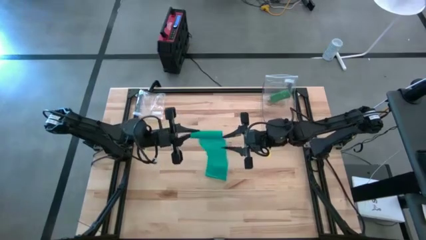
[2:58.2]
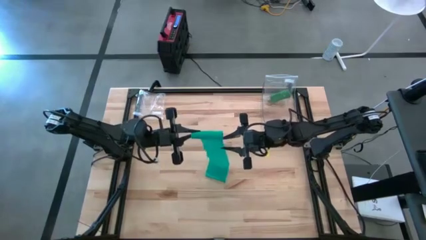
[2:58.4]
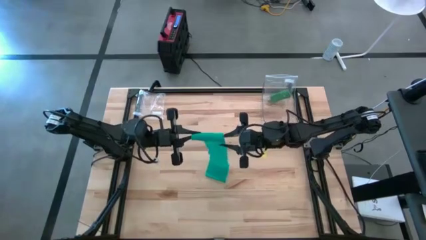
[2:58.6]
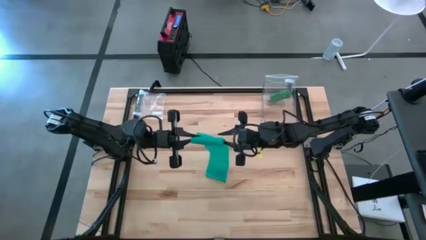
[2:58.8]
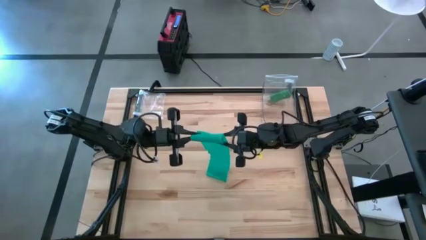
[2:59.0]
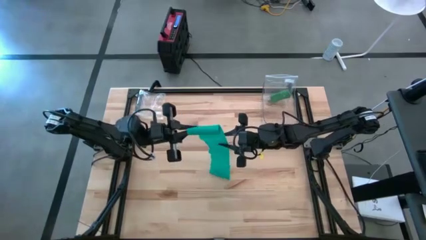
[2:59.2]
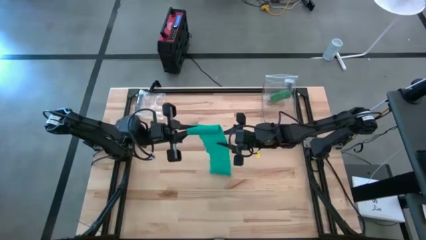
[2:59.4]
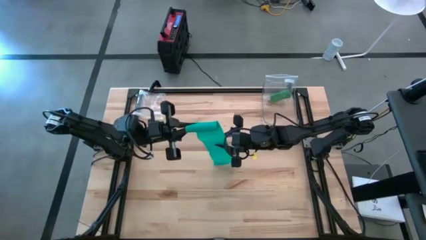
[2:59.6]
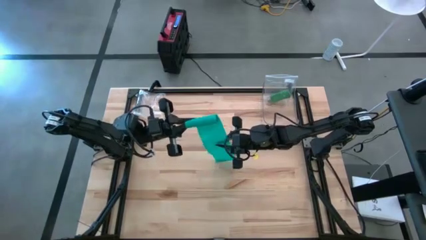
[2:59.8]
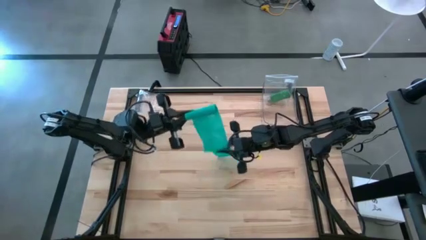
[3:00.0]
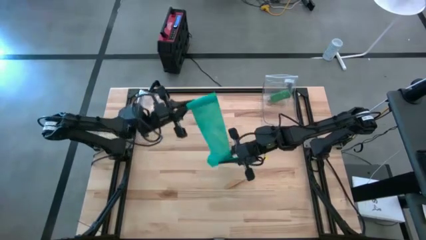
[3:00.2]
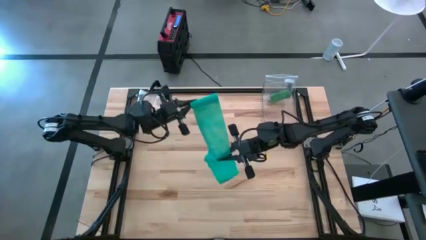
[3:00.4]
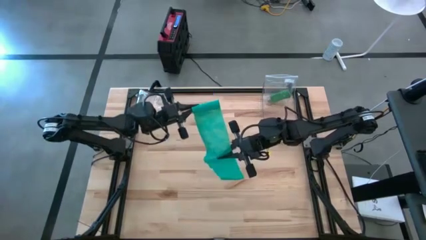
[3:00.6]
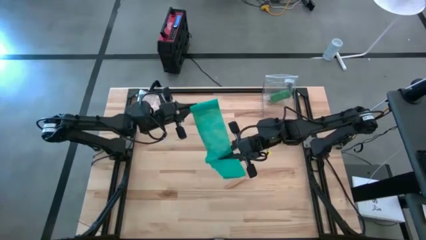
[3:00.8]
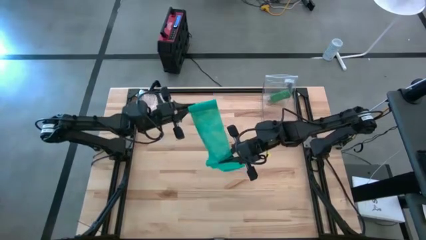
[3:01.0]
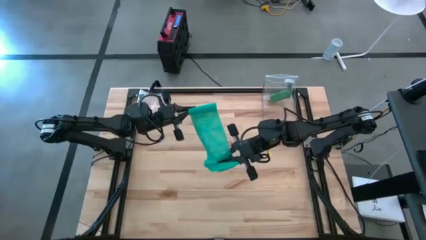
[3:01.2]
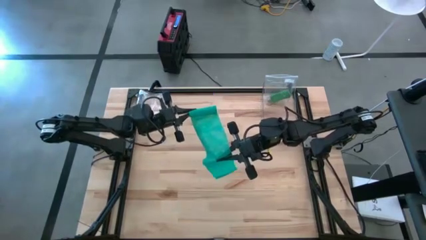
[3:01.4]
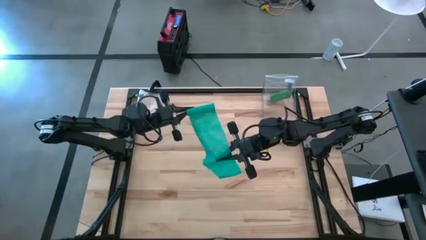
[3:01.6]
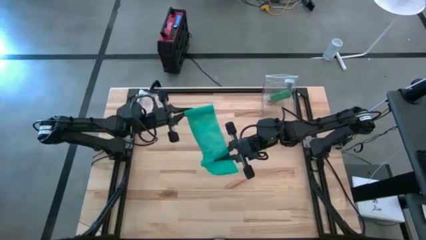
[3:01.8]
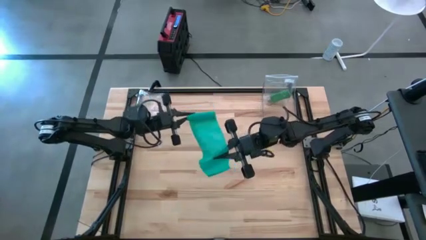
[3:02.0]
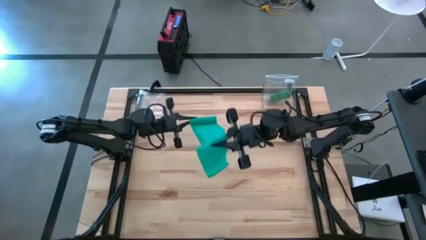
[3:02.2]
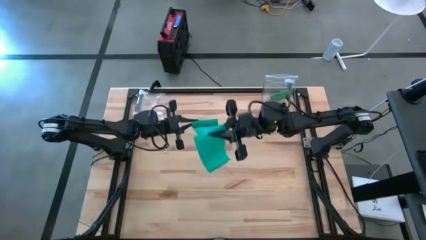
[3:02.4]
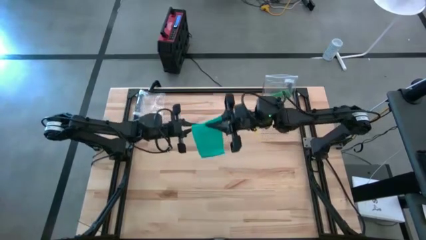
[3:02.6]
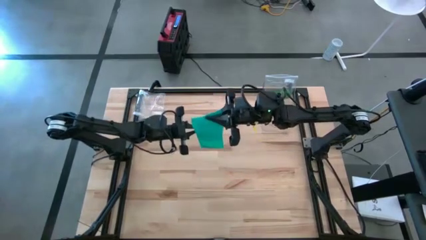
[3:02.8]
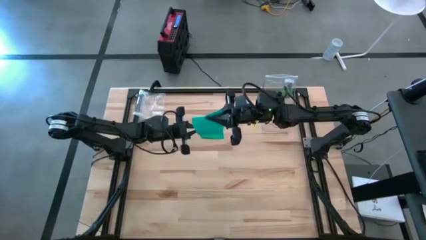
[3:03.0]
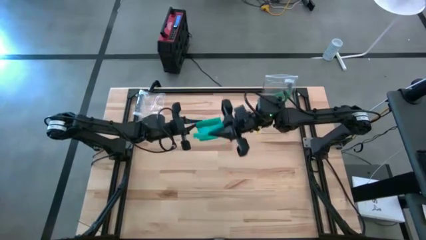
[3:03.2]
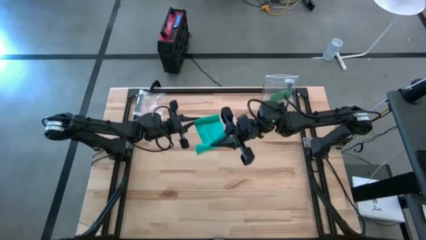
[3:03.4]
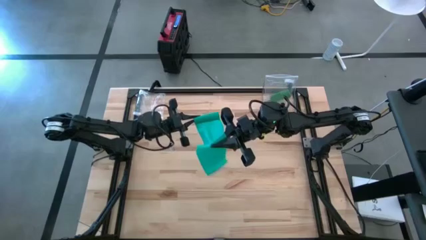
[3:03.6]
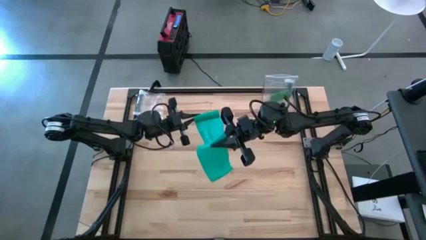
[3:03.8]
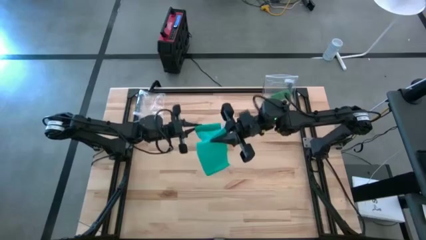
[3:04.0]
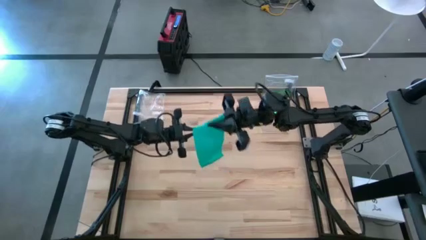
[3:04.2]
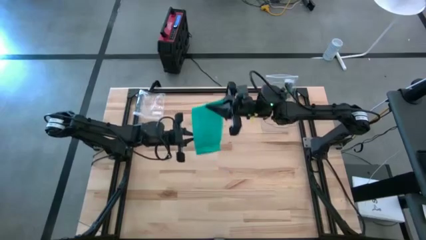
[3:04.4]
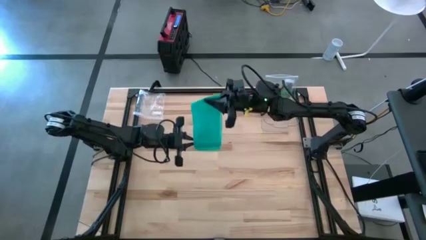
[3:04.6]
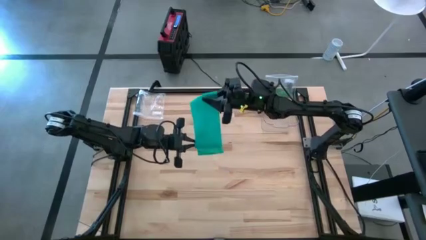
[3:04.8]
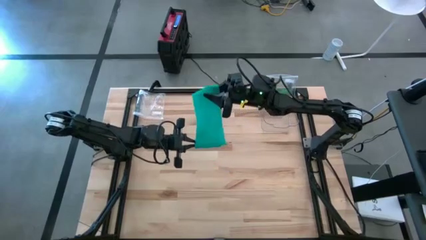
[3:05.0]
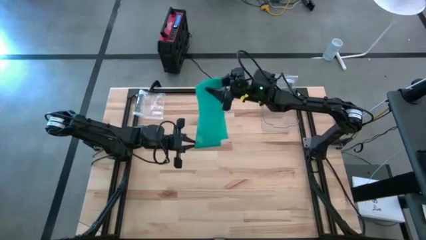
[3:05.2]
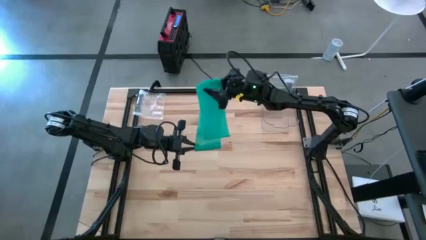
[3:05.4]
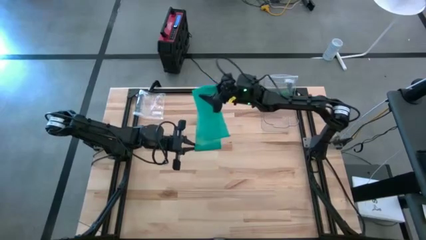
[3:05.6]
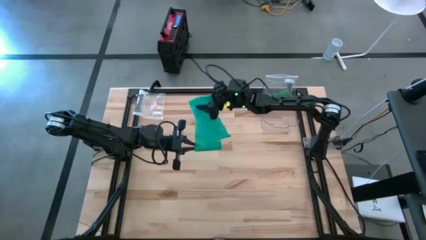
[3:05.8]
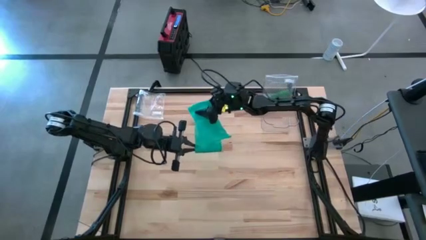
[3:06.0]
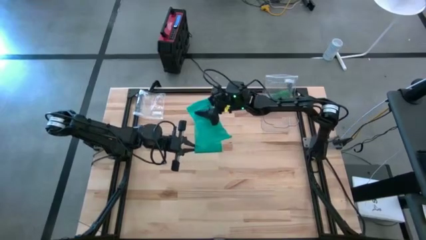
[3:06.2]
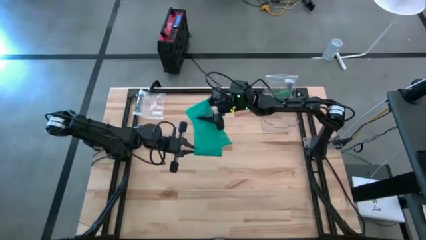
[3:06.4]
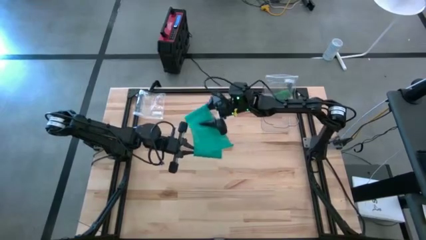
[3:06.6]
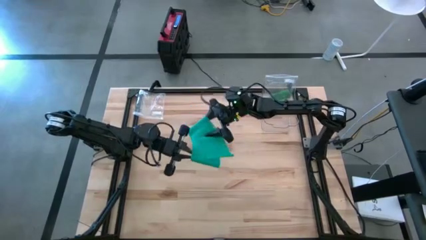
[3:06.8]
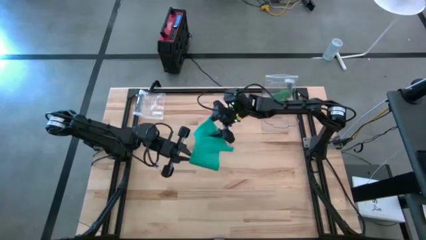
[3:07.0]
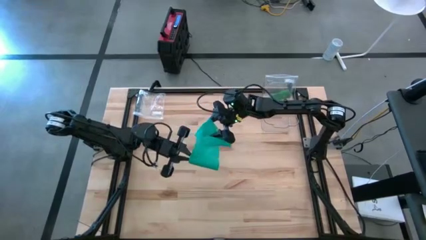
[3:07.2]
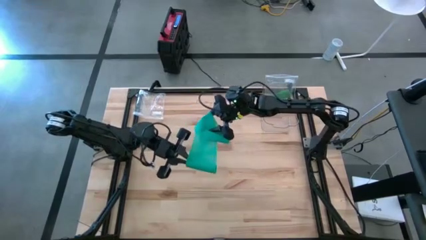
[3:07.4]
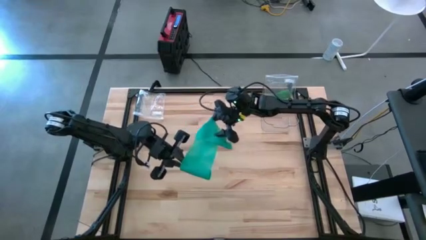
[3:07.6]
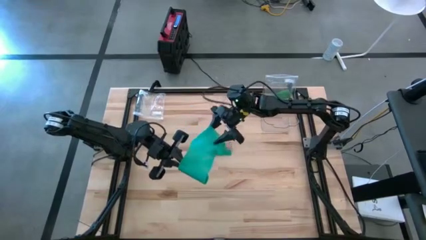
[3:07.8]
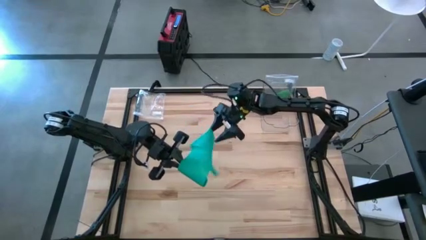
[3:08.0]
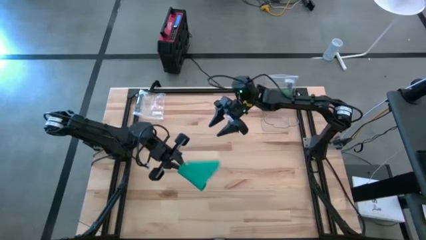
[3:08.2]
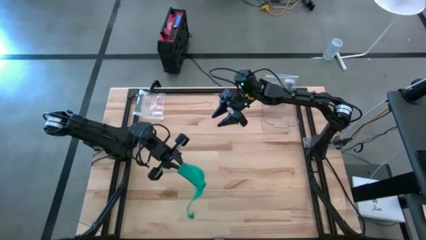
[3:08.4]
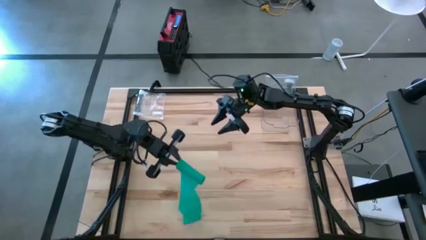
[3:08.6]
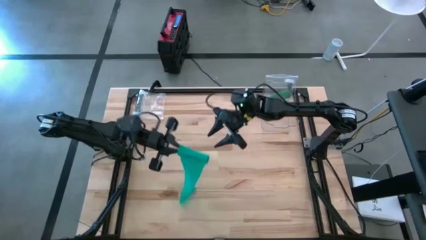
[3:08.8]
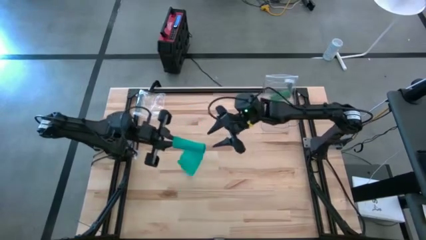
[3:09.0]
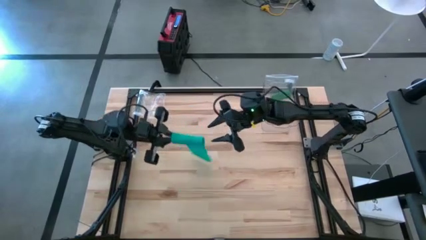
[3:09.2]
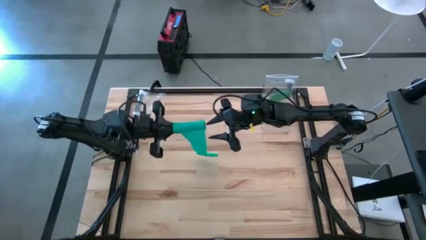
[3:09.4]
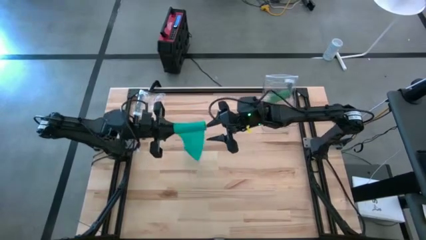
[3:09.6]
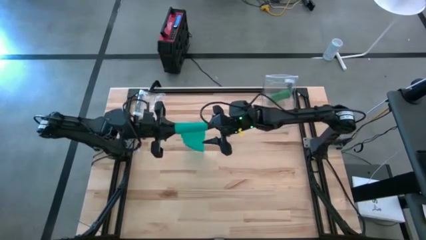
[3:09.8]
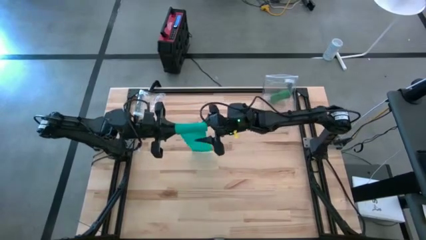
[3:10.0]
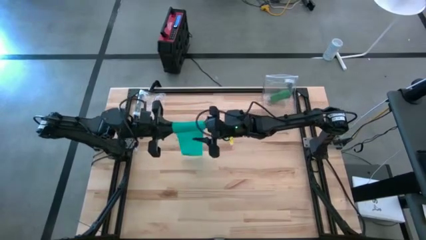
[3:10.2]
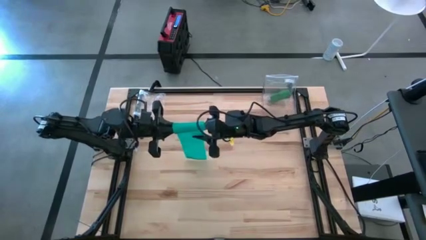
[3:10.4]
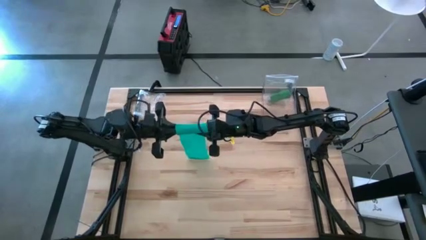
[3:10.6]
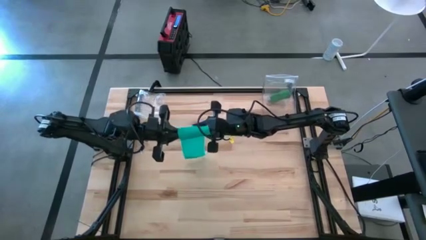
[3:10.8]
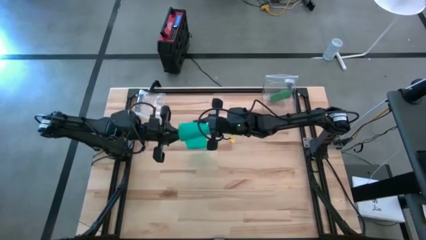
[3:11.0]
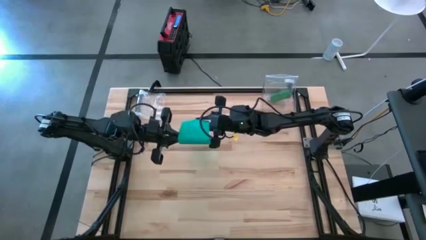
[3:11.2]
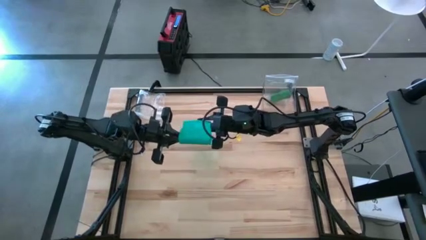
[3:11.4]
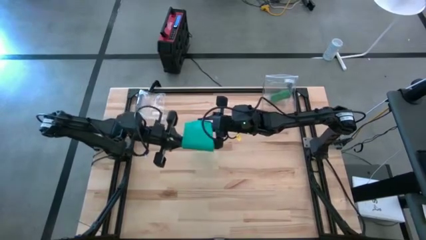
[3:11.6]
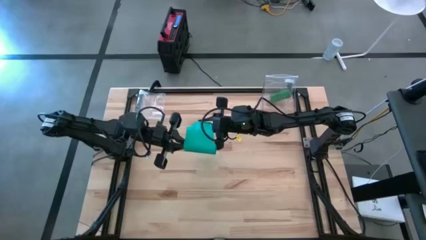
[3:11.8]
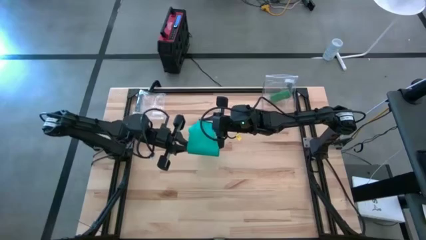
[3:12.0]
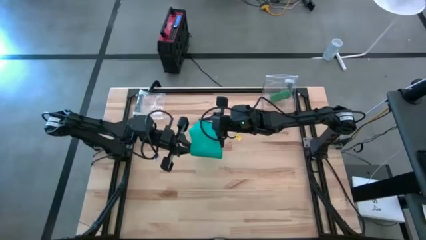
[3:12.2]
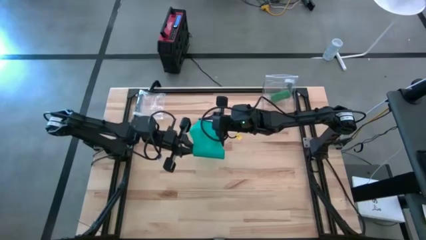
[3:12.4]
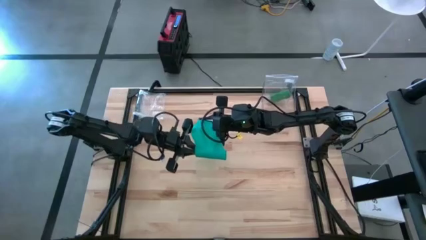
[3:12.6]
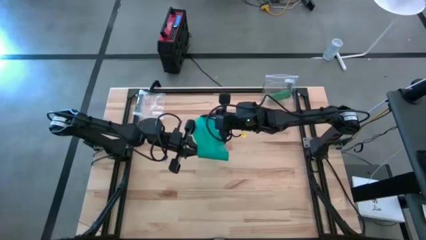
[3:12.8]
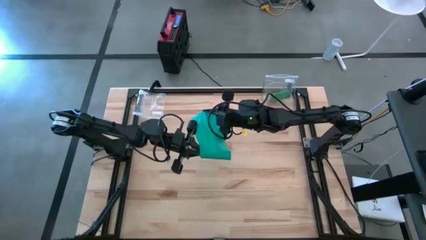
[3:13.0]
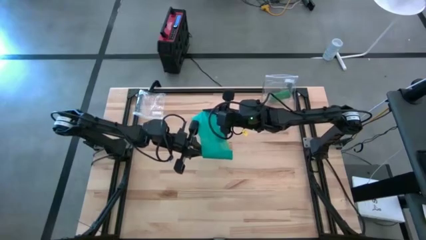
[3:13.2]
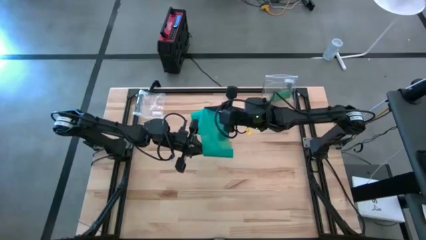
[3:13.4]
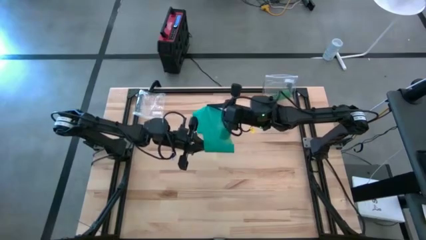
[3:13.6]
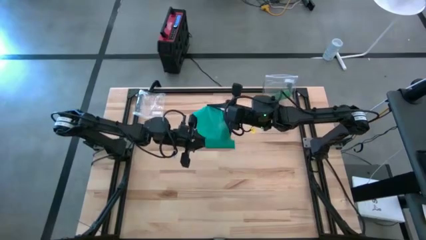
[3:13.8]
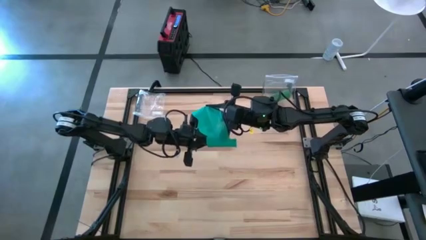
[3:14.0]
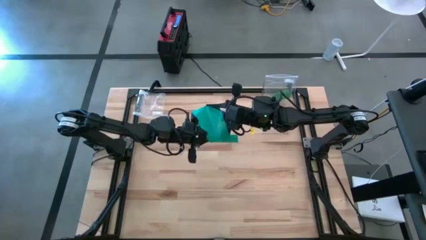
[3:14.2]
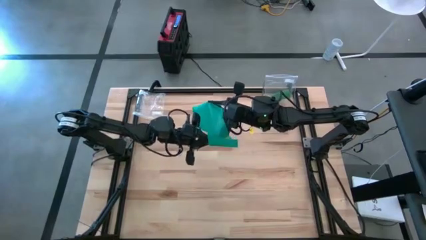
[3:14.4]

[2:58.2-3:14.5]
Task: Roll bandage
Roll the dark green bandage
